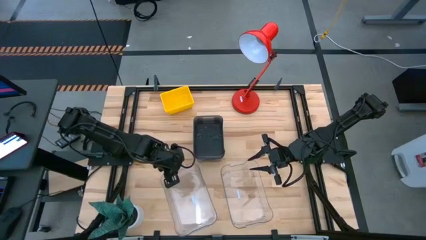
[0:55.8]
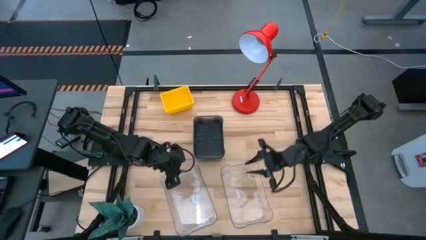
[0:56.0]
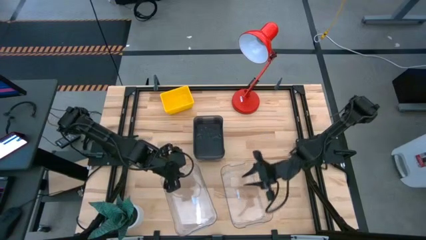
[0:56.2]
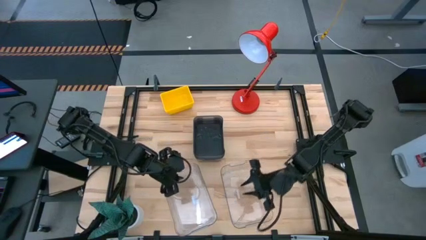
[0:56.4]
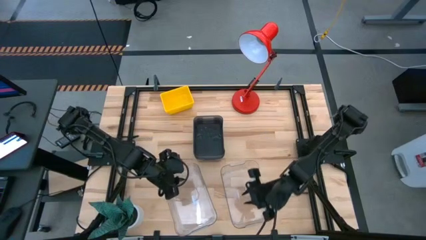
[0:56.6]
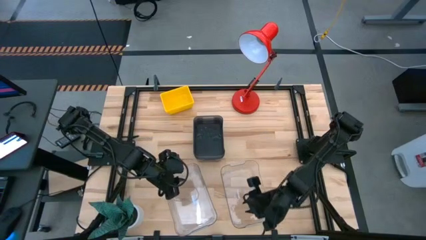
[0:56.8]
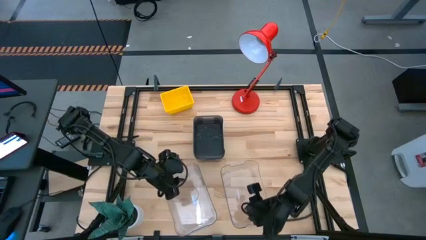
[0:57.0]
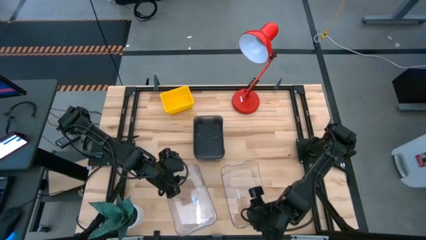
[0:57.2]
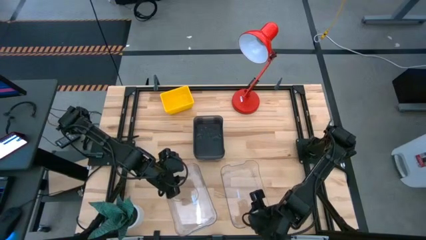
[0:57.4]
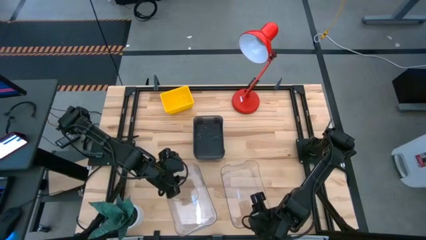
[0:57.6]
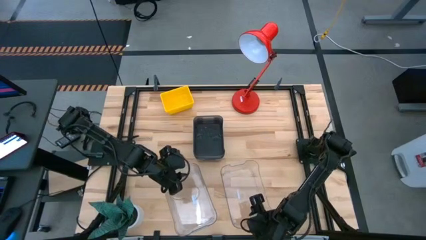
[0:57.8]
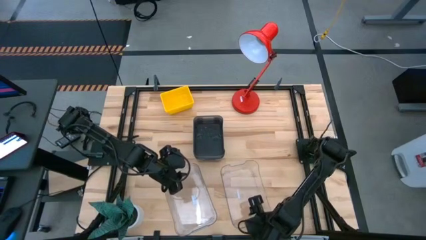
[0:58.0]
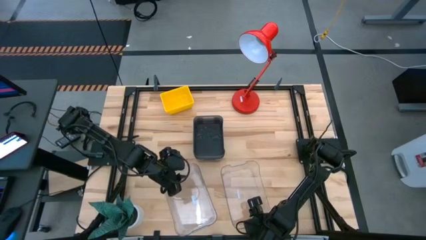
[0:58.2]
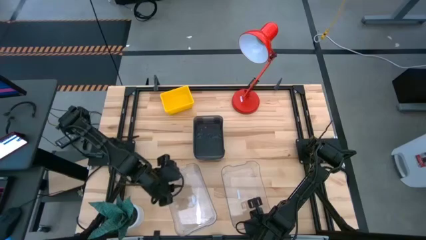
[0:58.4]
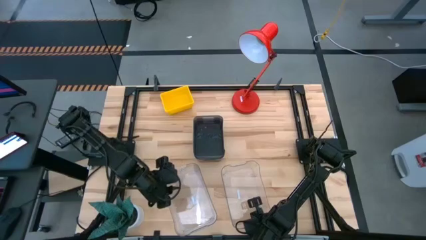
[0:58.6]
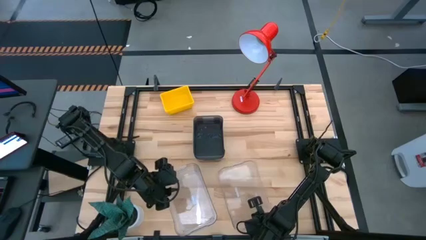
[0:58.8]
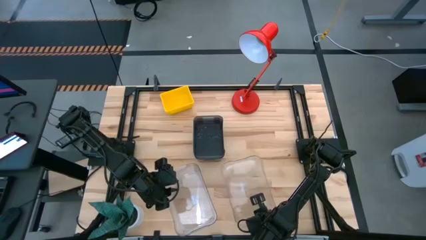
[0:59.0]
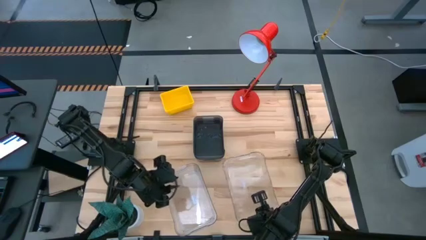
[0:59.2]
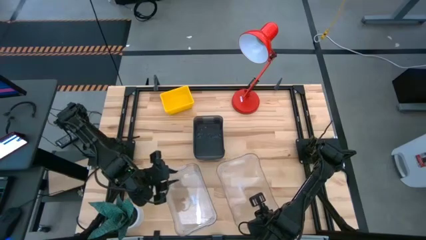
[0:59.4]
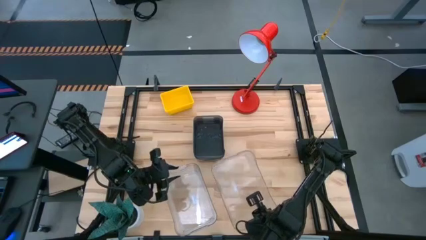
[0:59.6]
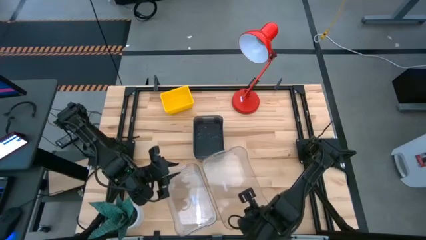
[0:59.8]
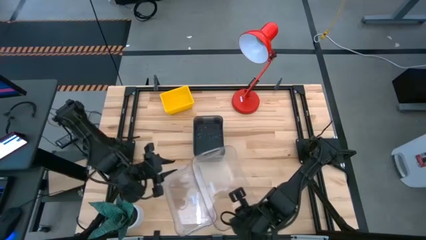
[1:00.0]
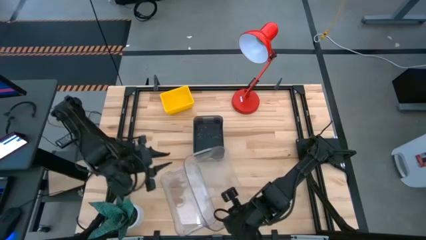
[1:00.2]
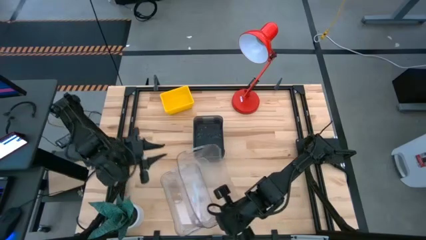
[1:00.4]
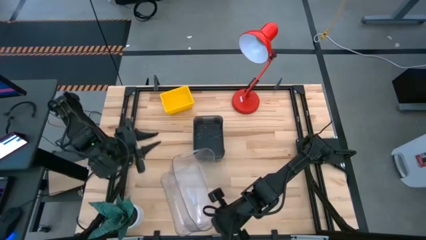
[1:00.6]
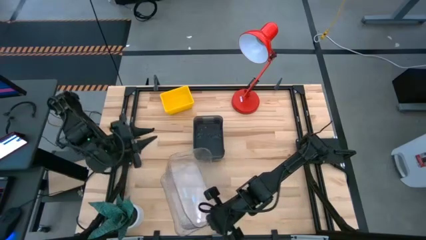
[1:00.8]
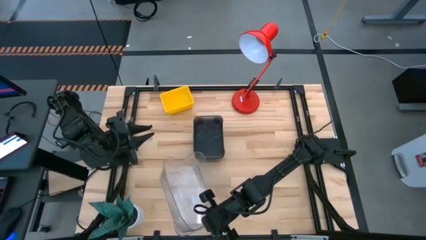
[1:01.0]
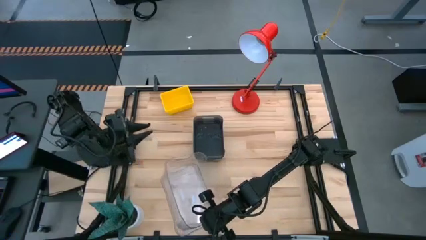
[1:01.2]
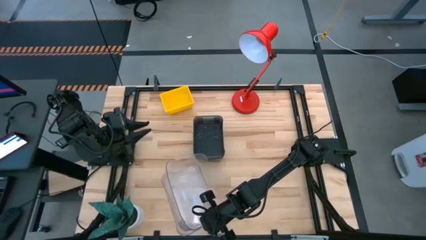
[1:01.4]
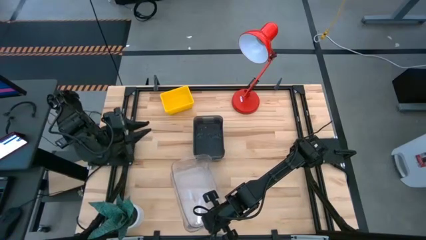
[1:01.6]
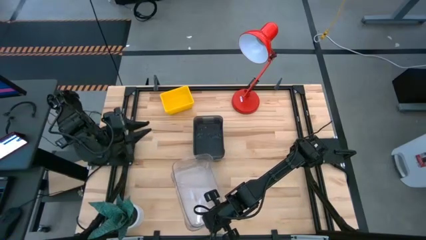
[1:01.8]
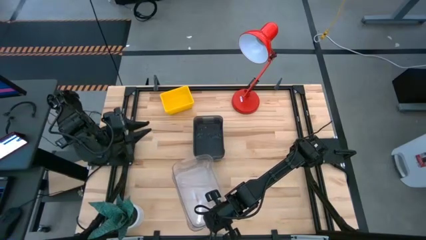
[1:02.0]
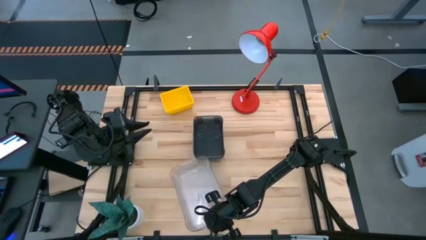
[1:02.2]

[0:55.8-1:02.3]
Stack the right transparent bin on top of the left transparent bins

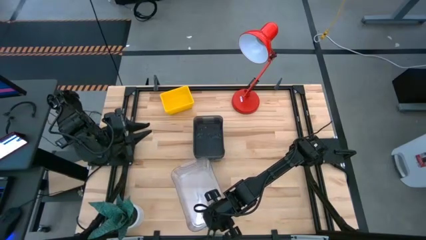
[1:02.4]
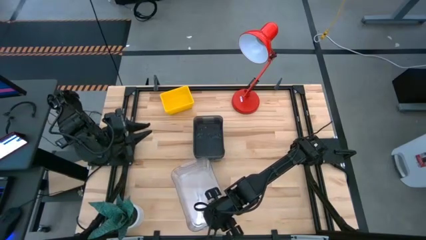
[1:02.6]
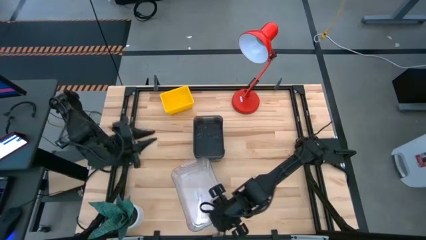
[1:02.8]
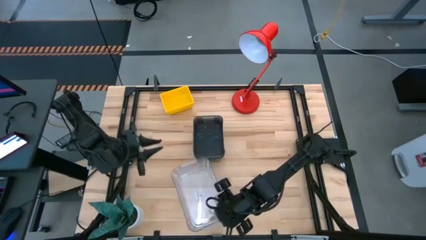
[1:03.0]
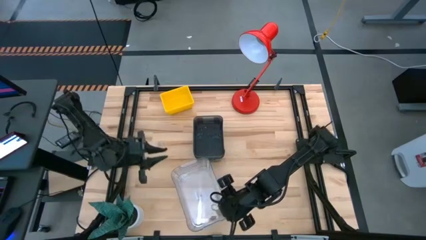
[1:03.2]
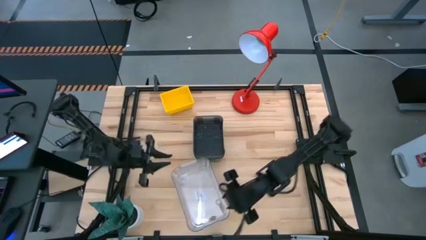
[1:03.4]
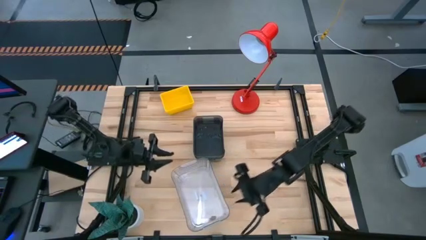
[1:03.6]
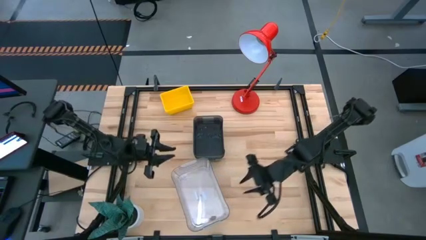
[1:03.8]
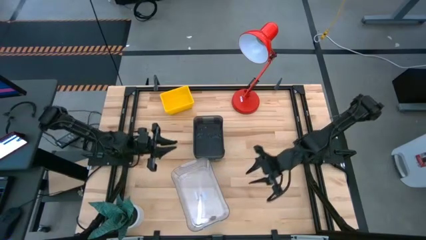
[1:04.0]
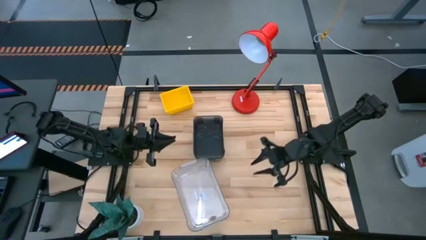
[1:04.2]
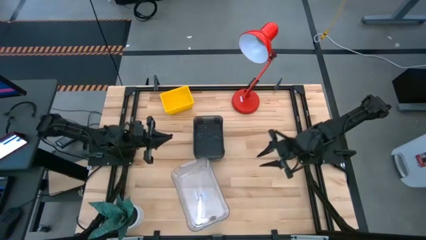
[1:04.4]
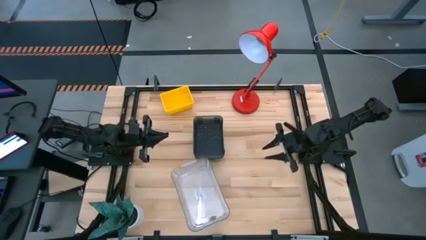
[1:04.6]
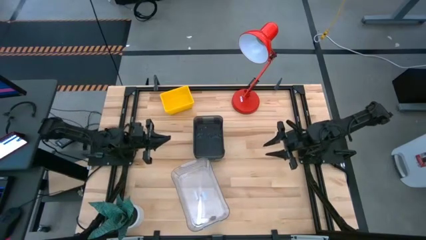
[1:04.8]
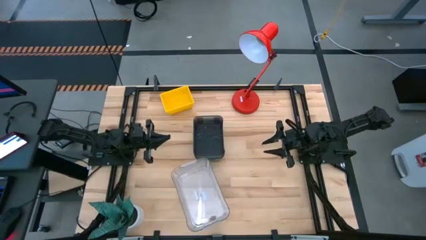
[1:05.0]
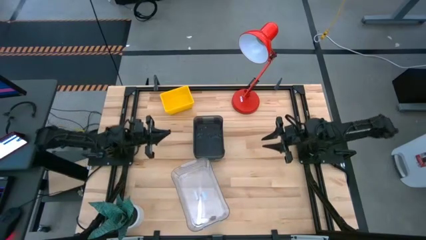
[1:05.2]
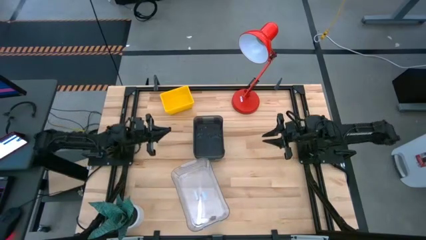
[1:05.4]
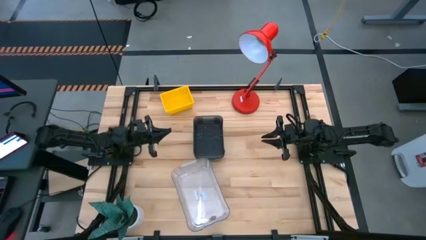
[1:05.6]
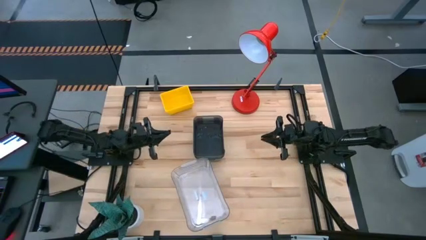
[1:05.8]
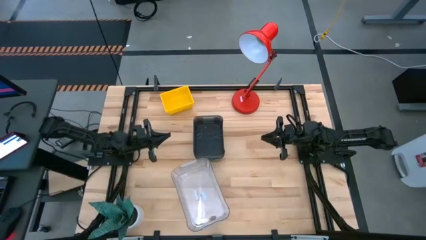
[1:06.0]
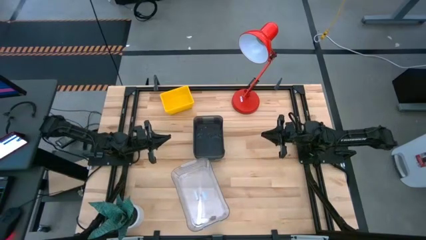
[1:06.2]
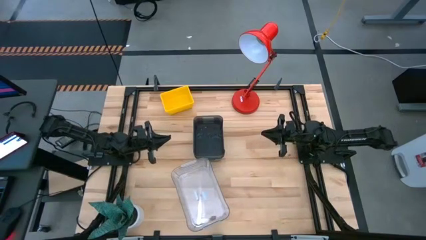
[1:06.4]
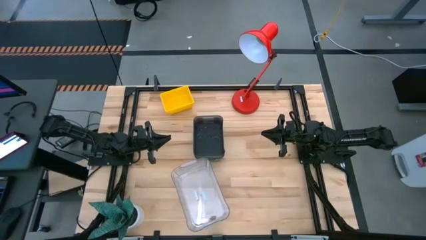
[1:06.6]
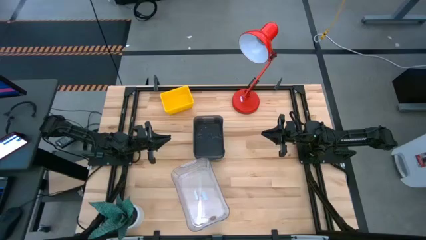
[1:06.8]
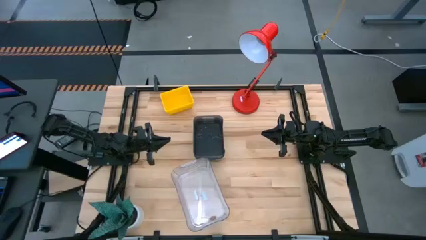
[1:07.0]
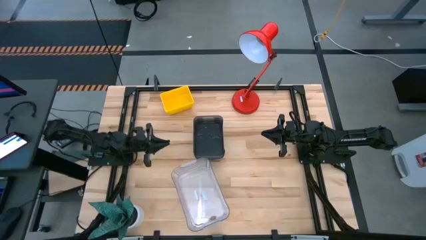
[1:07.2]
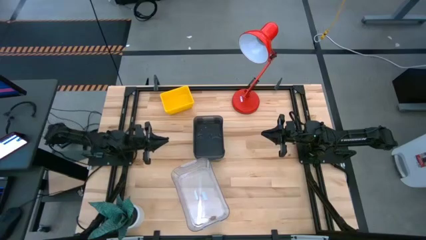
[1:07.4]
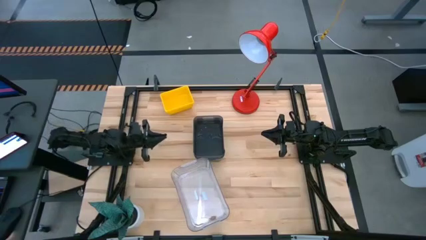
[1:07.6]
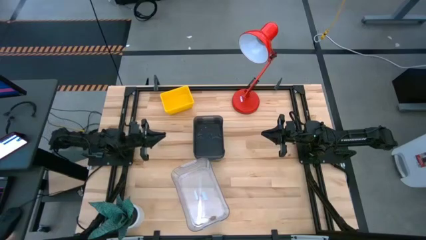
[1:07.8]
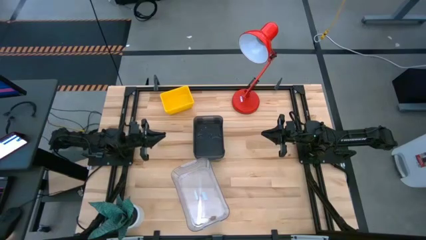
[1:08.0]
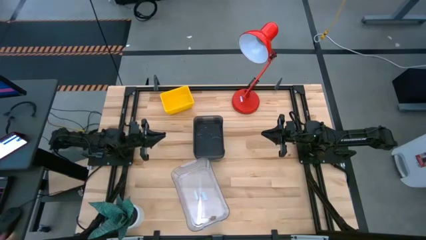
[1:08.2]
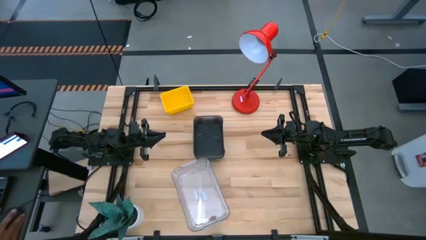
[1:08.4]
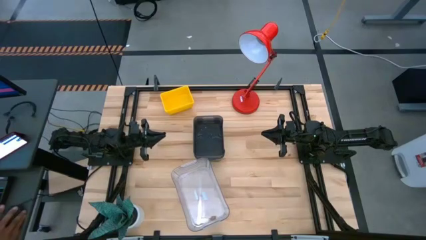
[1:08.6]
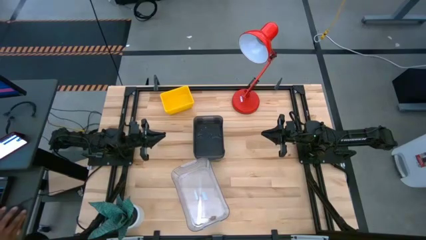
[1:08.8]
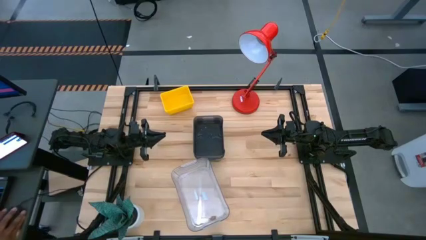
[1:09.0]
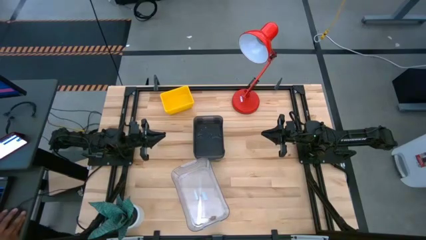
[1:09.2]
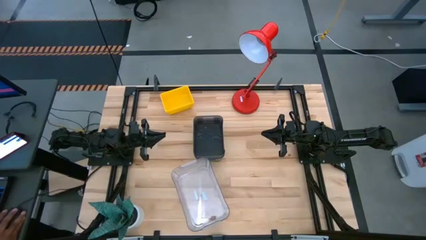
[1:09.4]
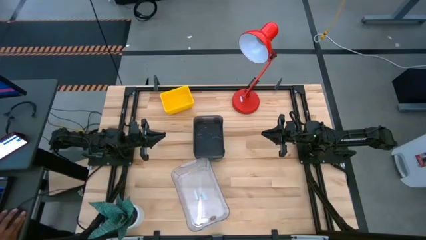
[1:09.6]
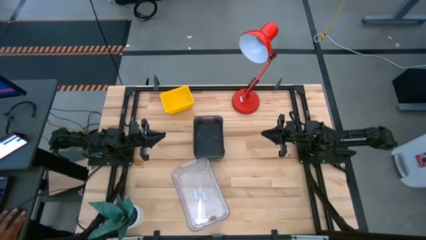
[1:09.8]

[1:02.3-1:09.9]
Return to Home Position
